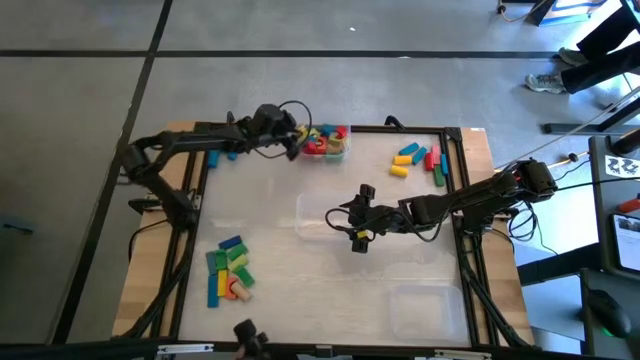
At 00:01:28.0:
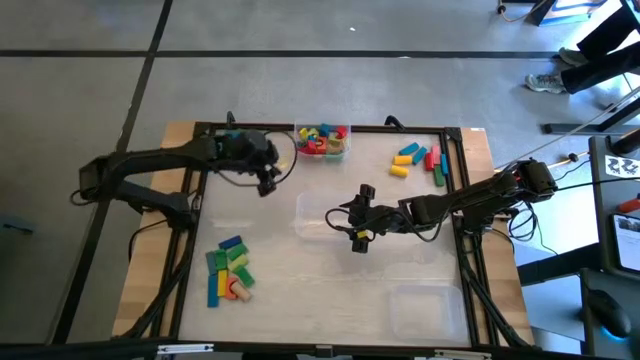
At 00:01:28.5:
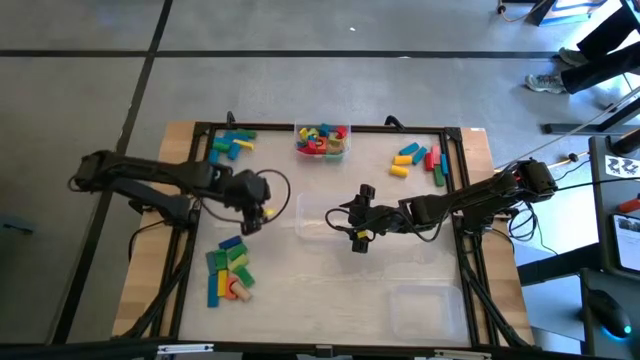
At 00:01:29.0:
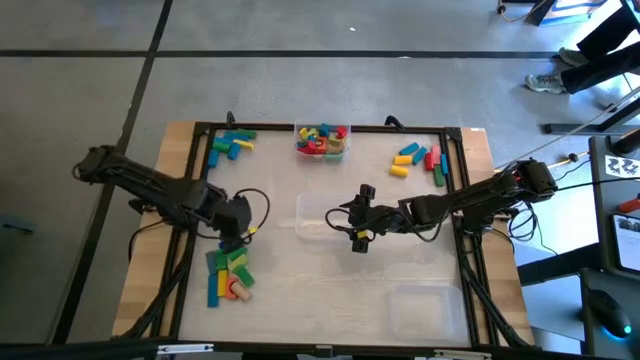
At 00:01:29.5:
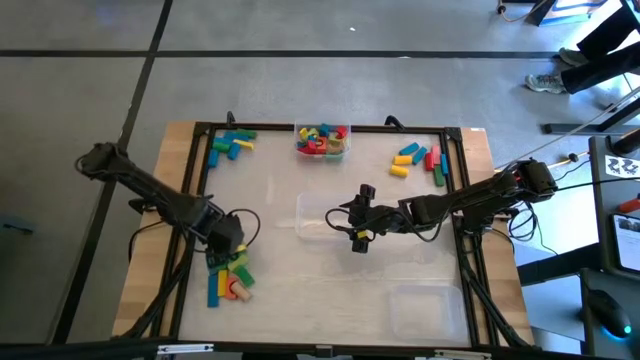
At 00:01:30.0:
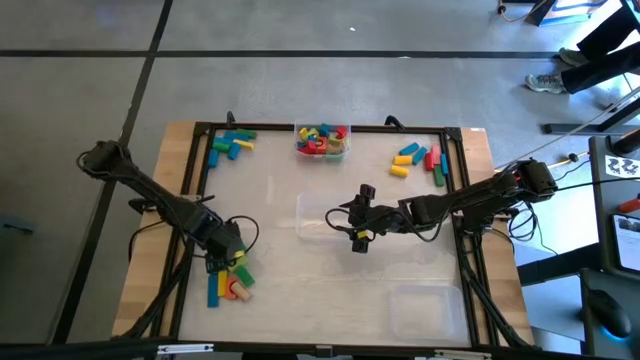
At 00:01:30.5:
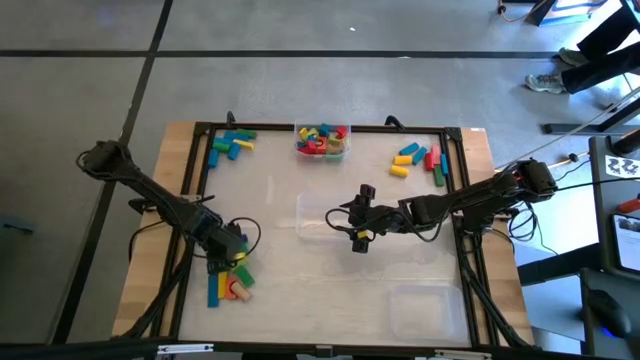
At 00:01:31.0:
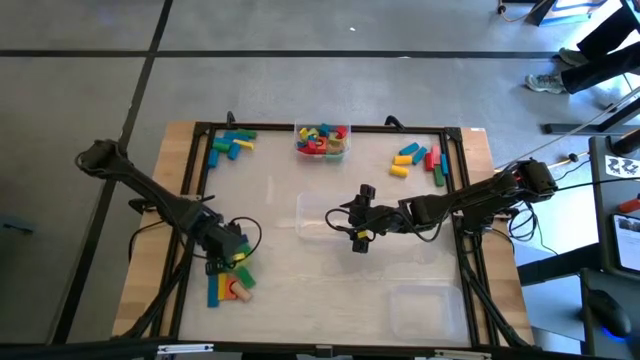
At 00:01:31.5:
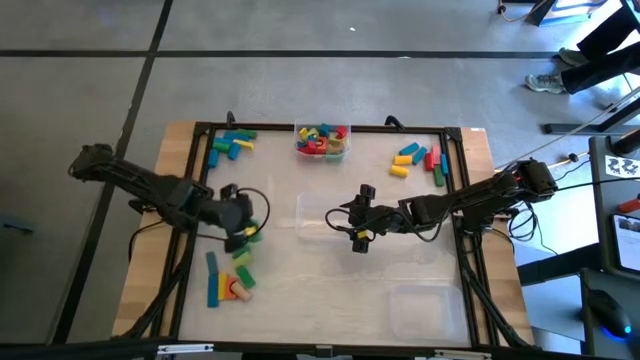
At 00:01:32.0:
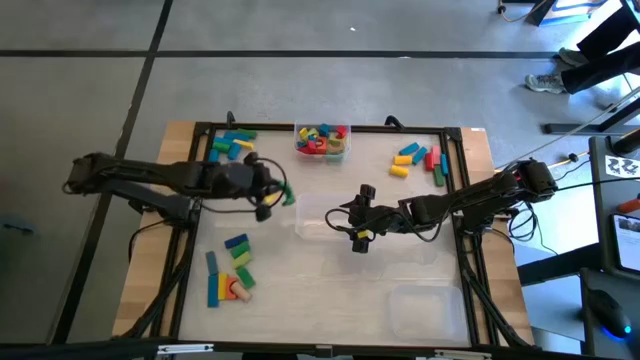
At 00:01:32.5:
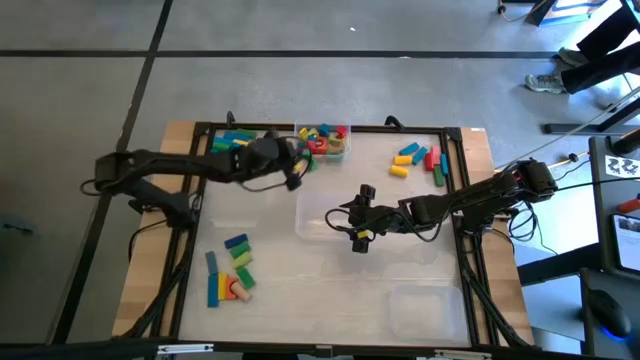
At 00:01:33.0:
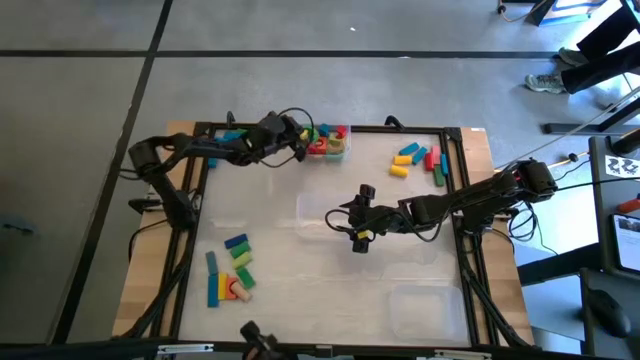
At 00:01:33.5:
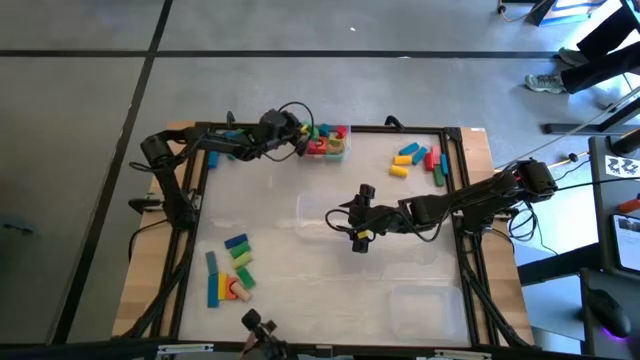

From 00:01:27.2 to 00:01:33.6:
Task: Sort blocks by size
Put the green arch block into the top transparent bin

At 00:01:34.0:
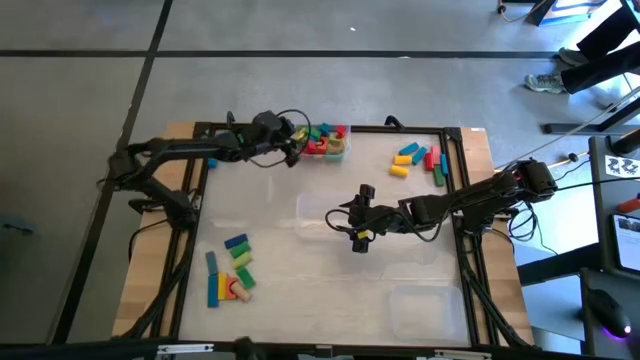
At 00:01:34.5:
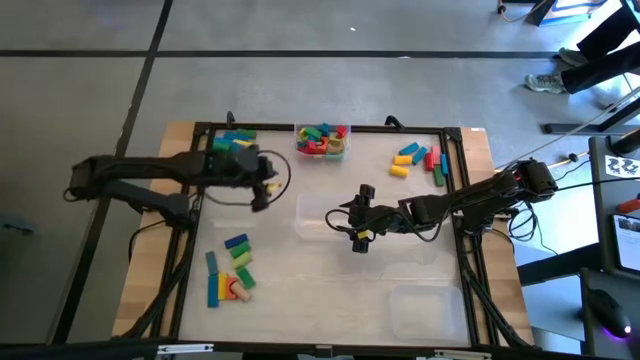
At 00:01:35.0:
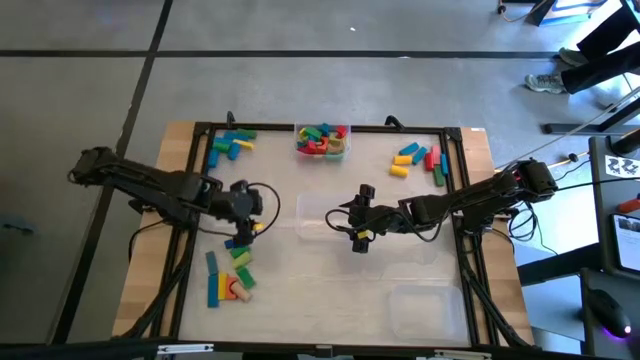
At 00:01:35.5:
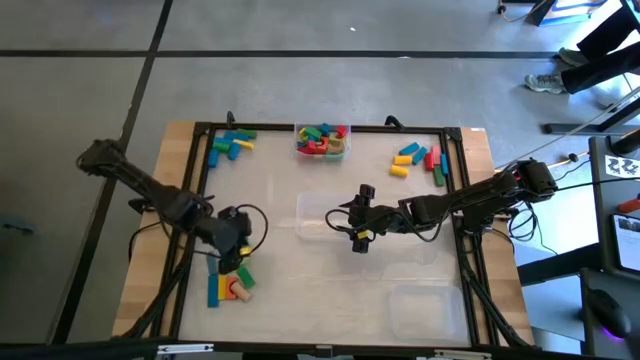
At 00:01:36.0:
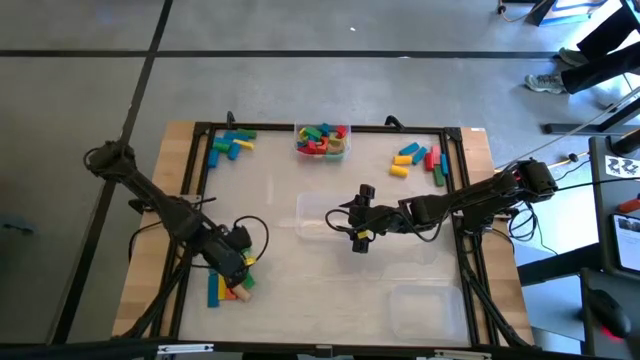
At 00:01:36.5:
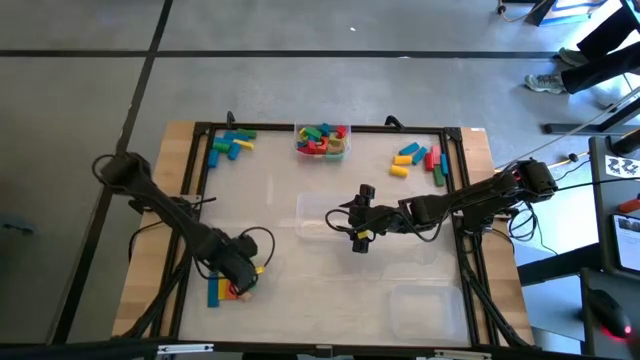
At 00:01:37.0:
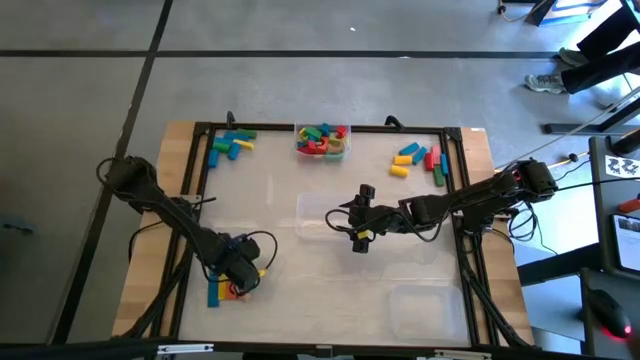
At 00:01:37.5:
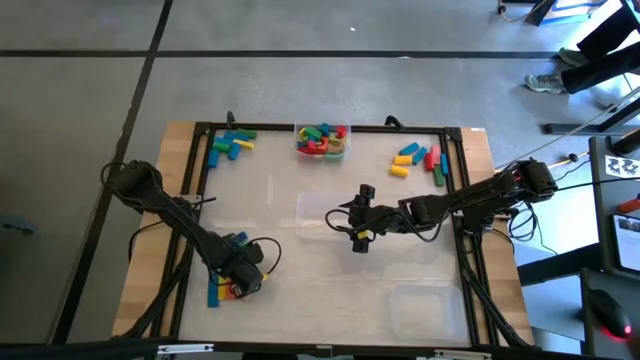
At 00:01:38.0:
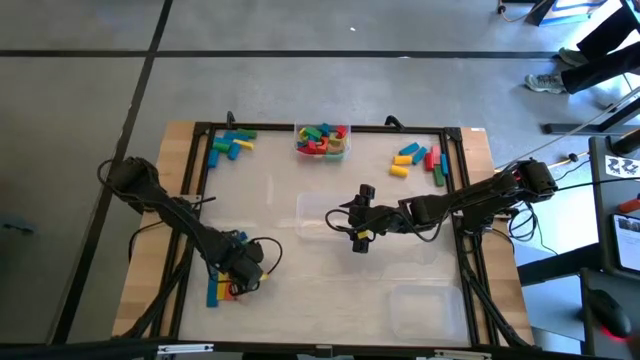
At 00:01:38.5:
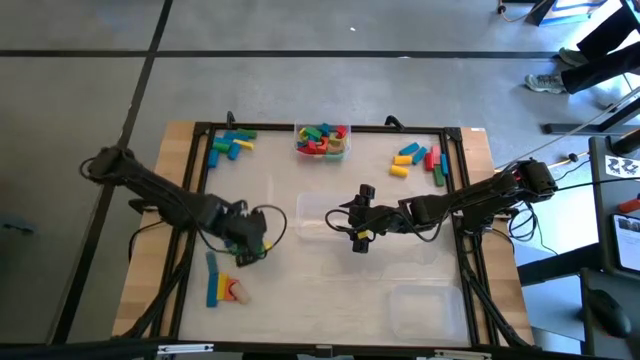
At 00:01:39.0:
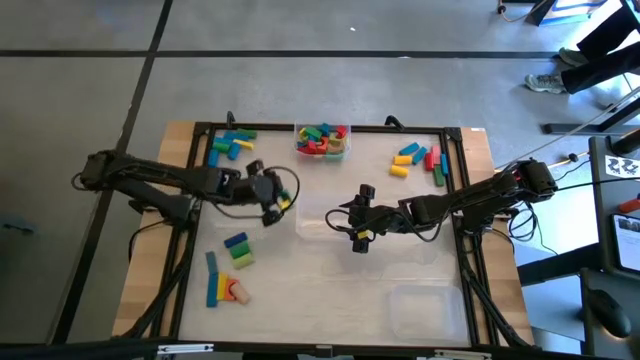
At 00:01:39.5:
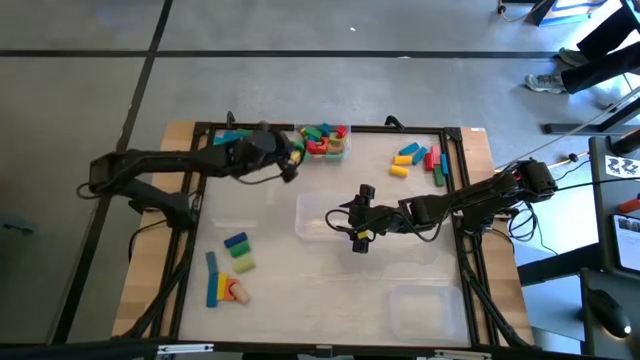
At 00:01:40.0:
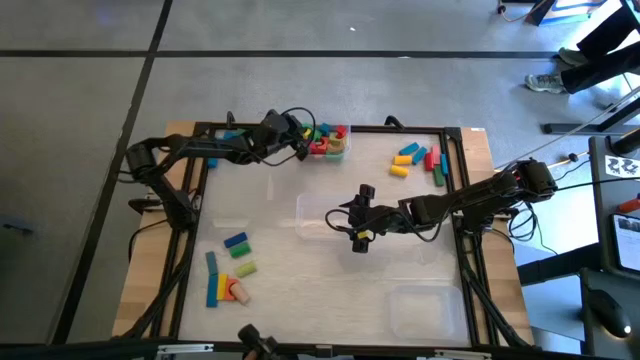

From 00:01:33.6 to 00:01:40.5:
Put the green arch block into the top transparent bin

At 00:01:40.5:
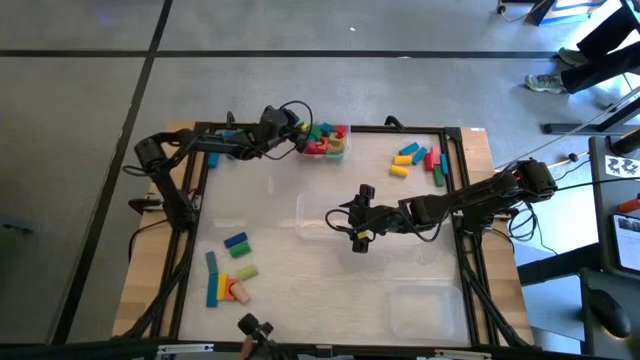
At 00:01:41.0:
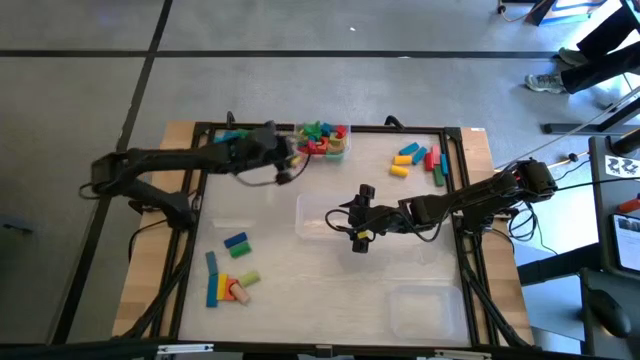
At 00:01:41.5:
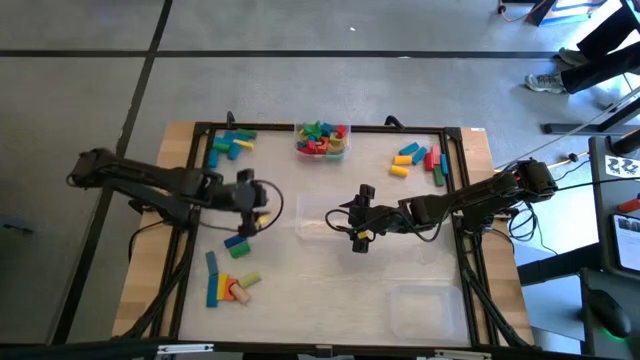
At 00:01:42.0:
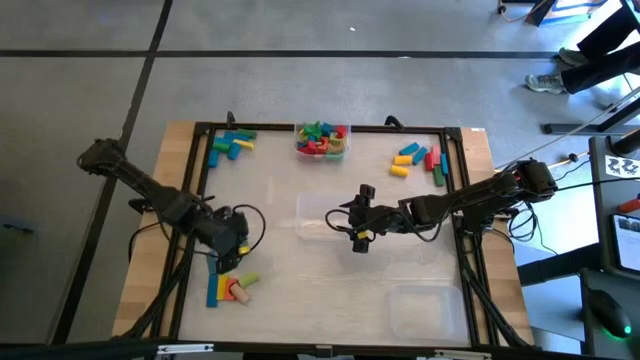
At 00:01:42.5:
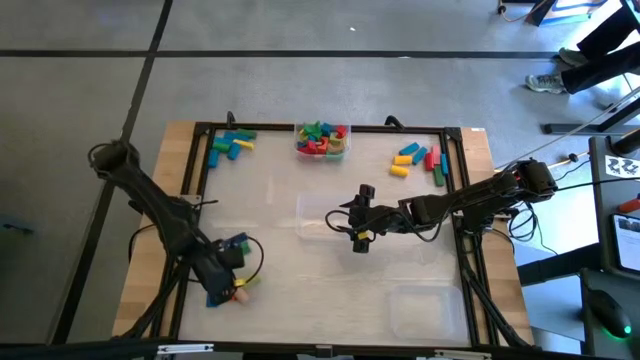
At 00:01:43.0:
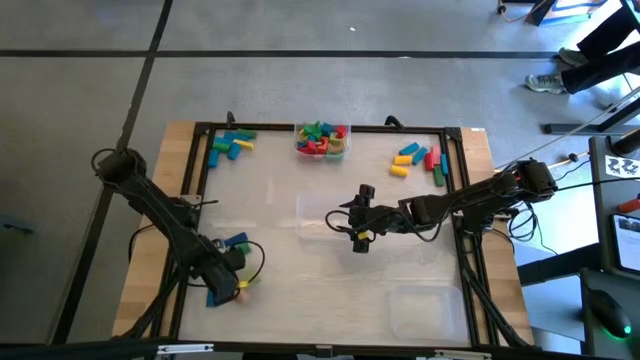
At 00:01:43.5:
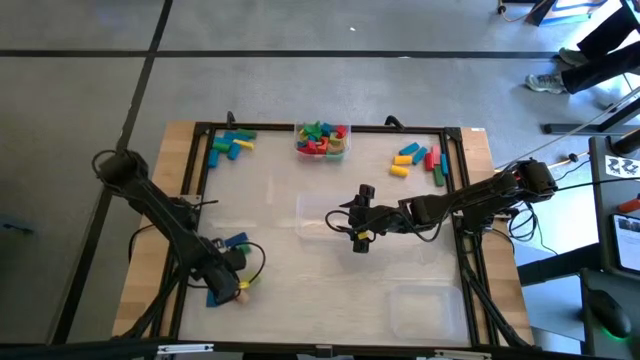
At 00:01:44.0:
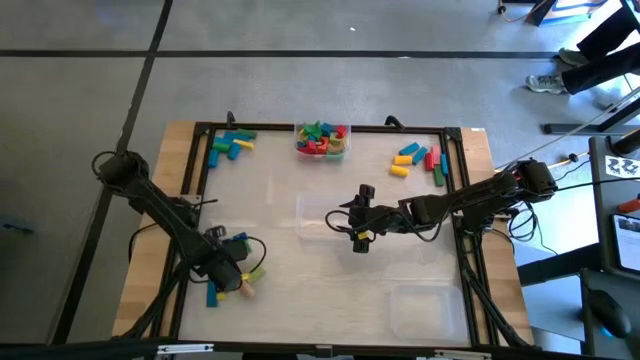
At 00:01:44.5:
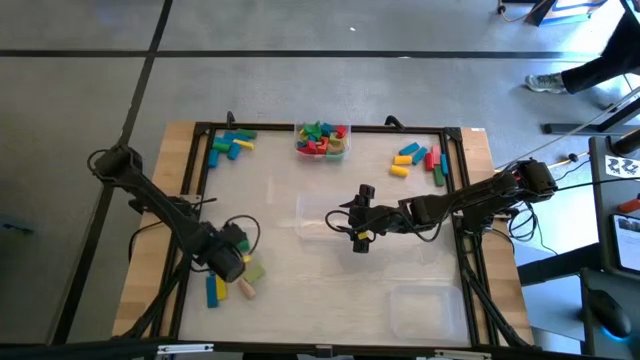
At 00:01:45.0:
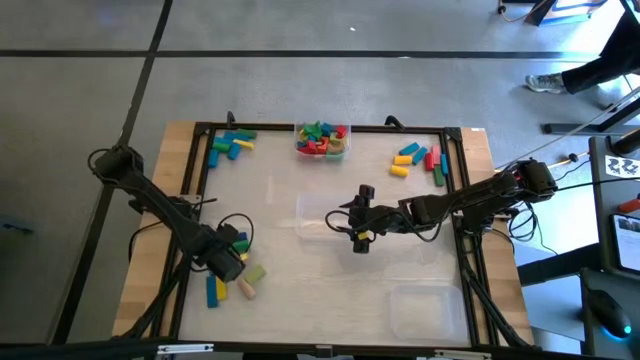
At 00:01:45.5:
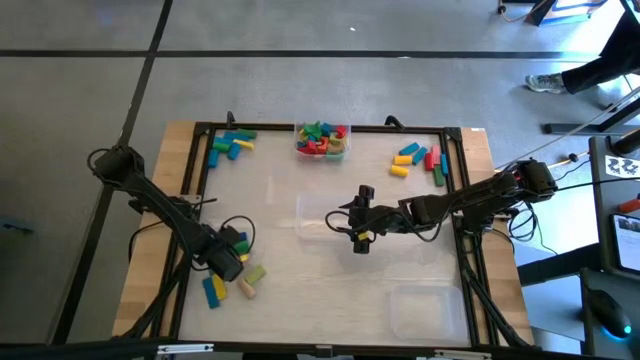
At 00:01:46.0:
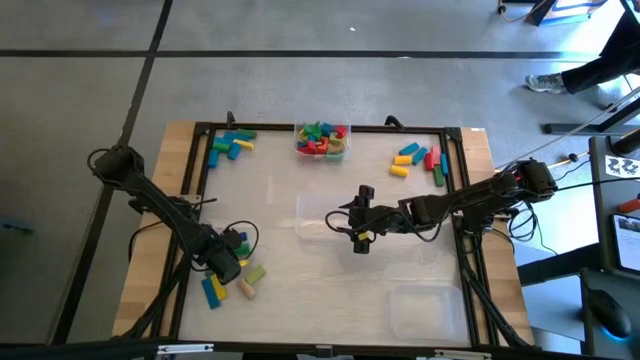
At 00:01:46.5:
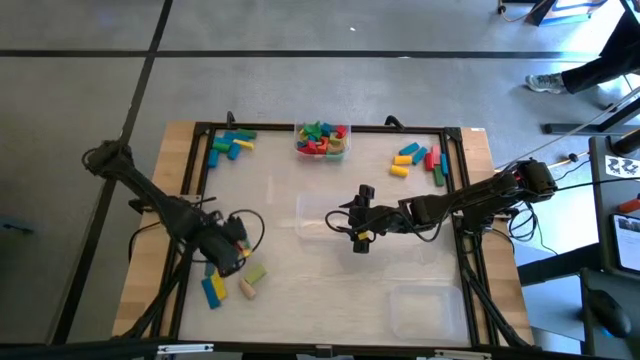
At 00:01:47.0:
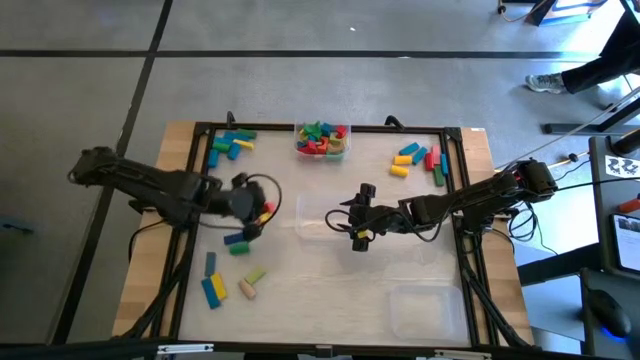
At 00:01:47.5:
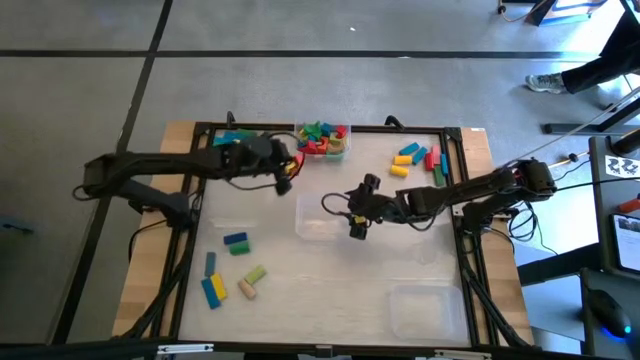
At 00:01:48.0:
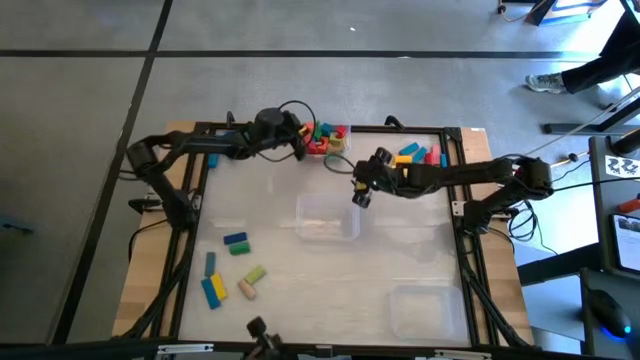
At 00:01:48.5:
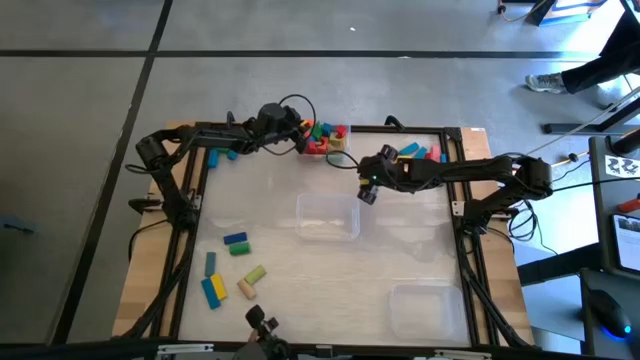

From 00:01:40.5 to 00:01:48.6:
Put the orange arch block into the top transparent bin
